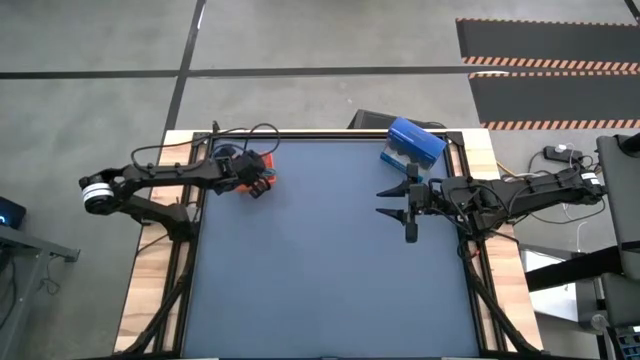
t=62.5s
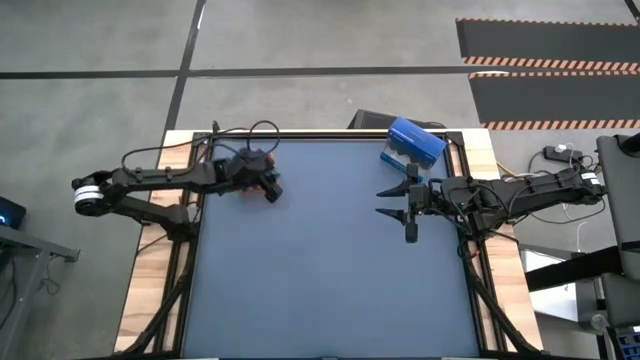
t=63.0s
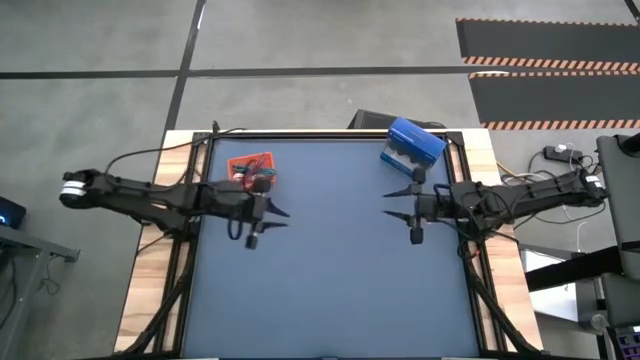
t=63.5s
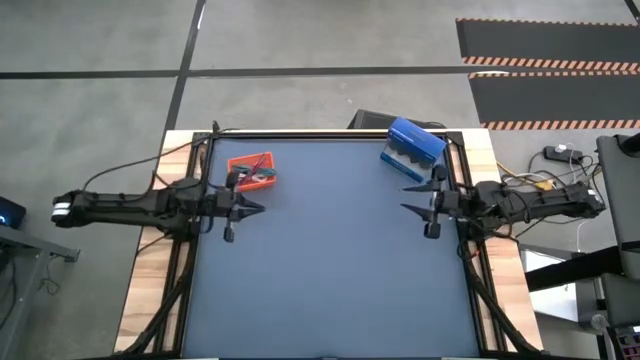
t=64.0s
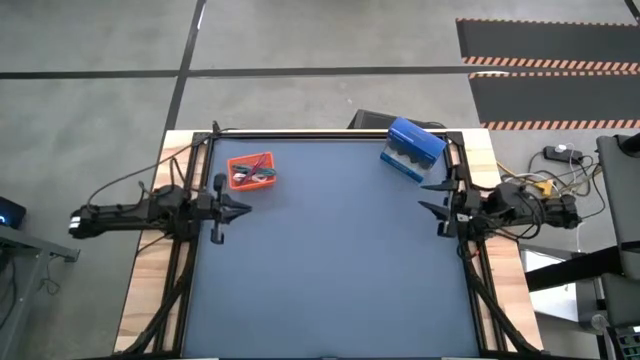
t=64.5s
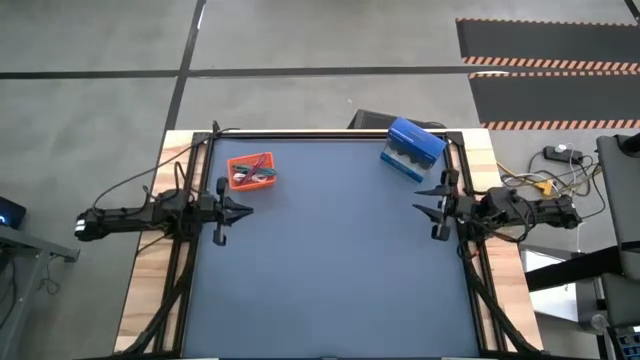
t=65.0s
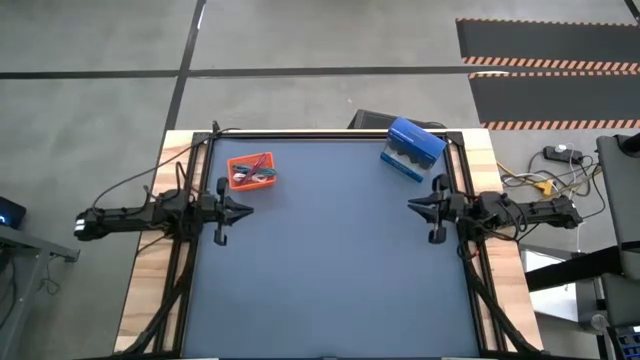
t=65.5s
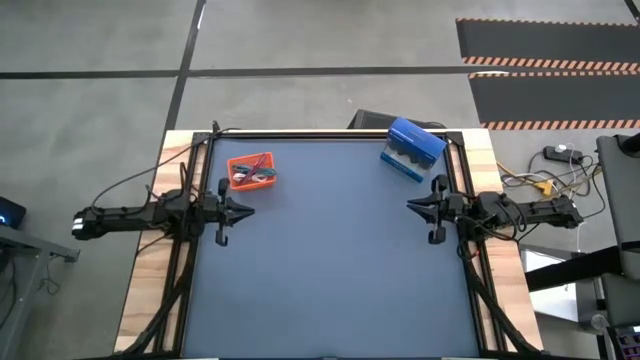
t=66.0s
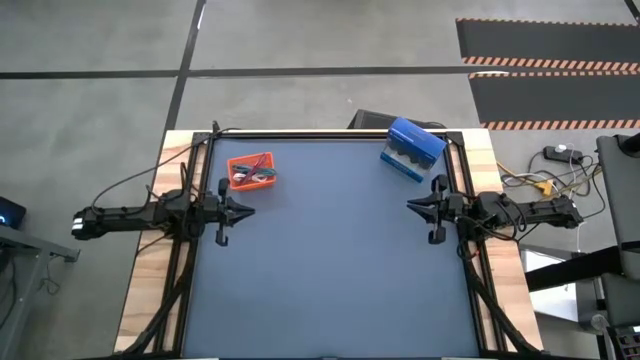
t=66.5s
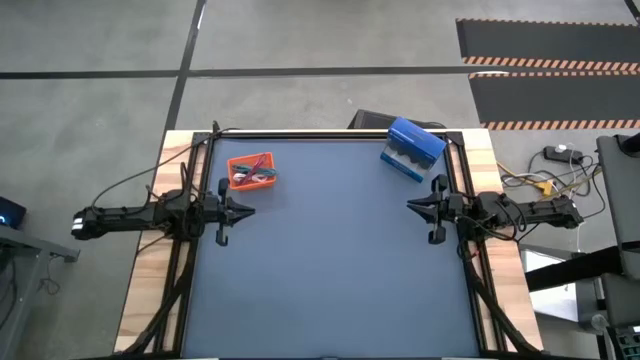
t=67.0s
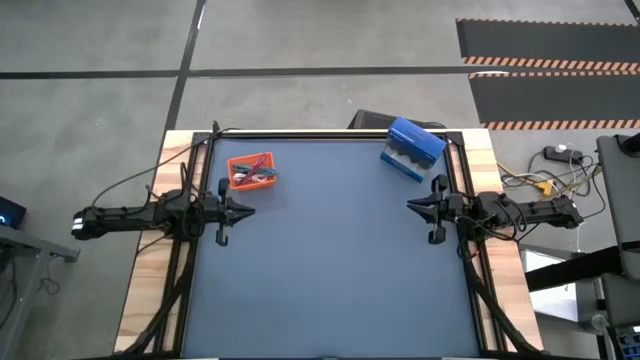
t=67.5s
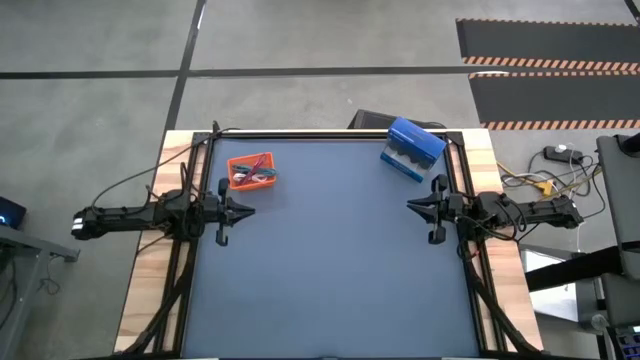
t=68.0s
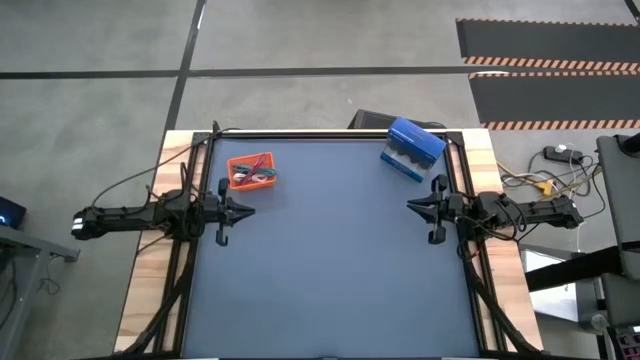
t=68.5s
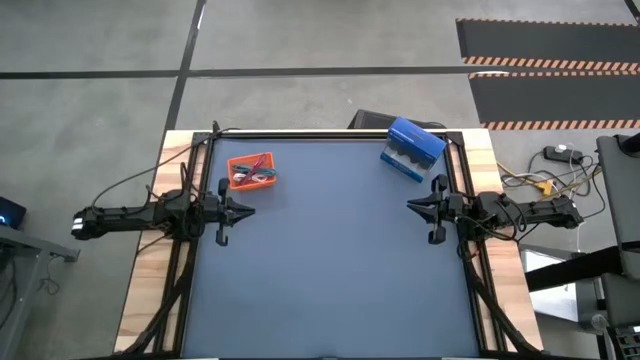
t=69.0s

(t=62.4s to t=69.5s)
Task: Pick and place USB-C Cables
Return to Home Position

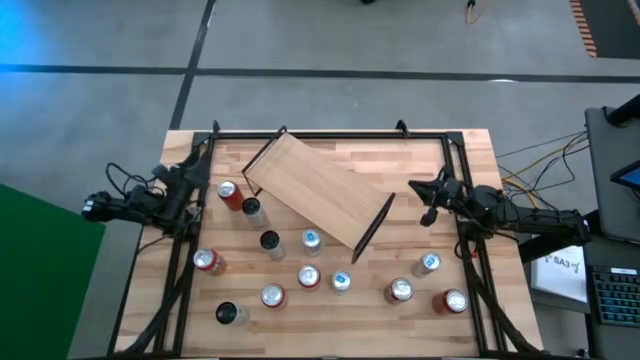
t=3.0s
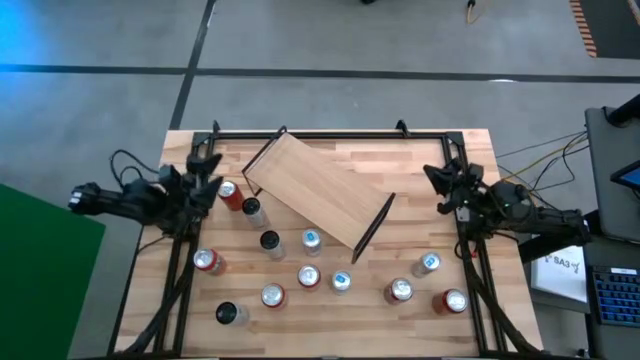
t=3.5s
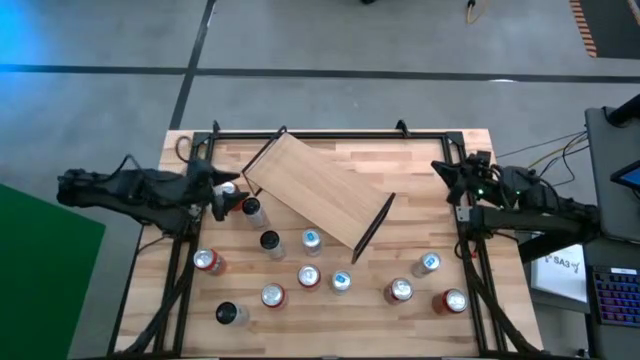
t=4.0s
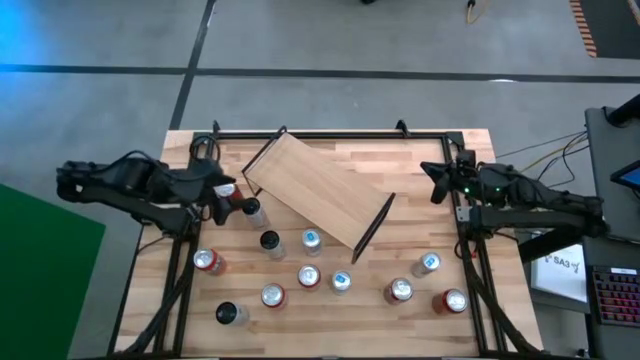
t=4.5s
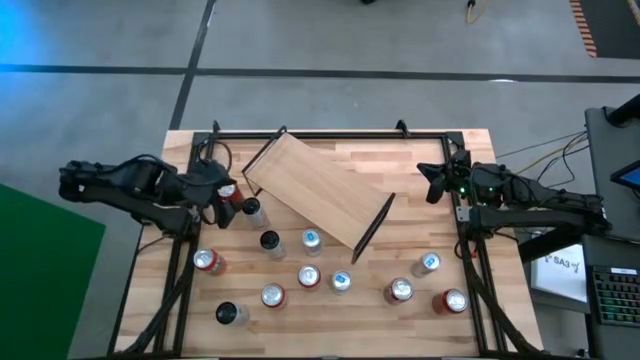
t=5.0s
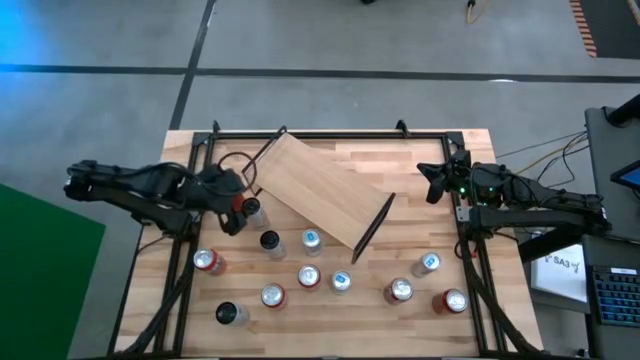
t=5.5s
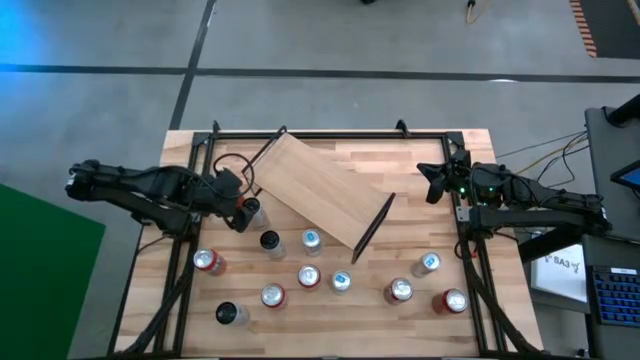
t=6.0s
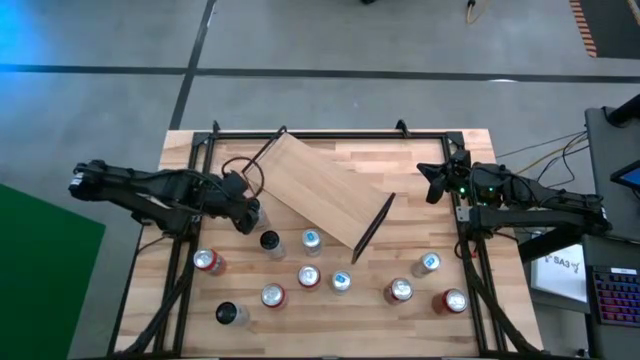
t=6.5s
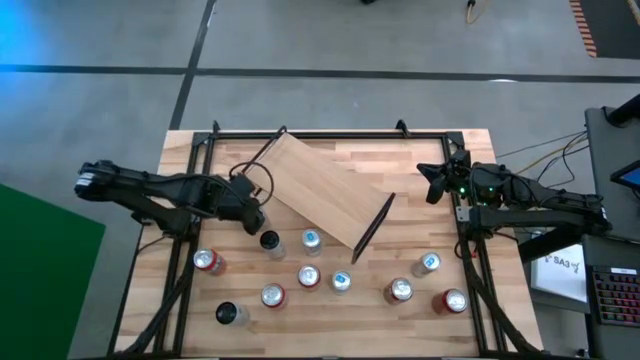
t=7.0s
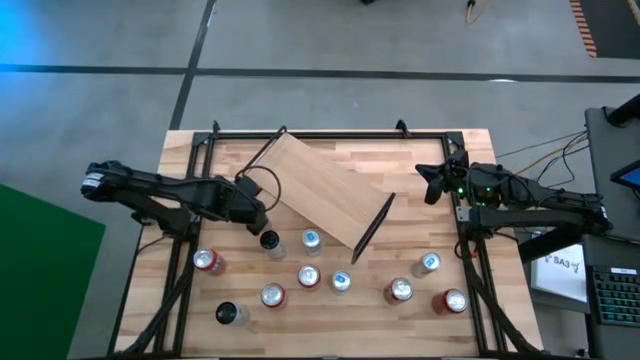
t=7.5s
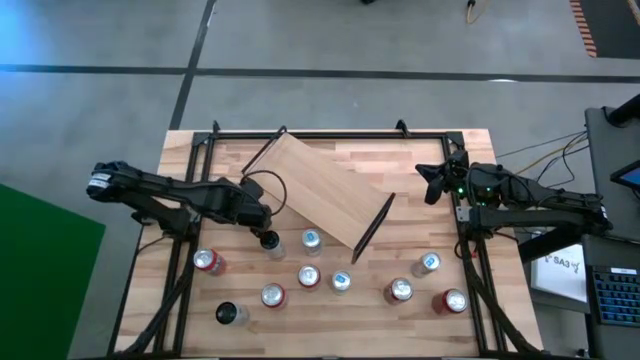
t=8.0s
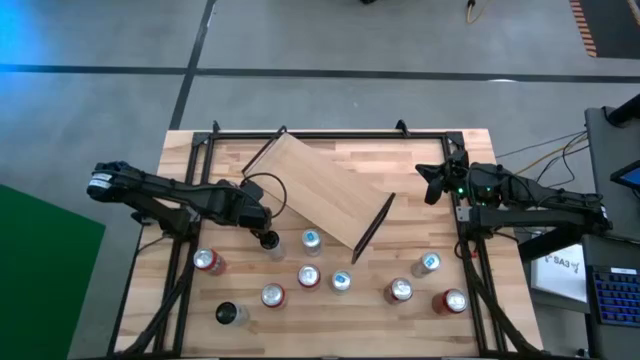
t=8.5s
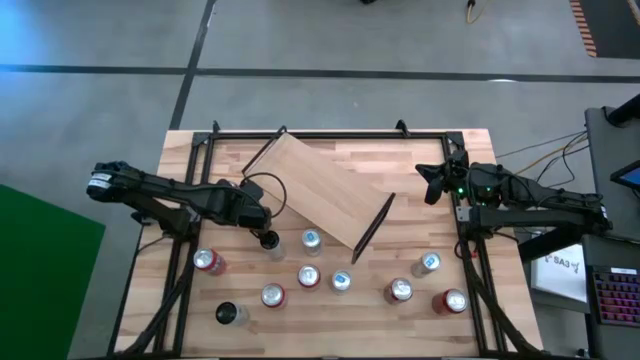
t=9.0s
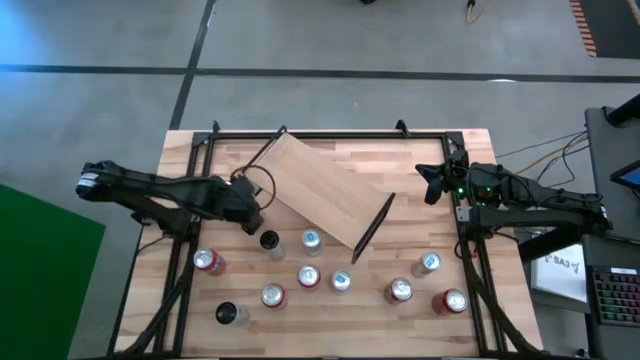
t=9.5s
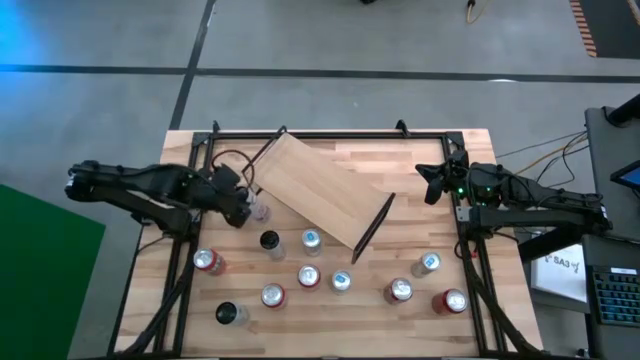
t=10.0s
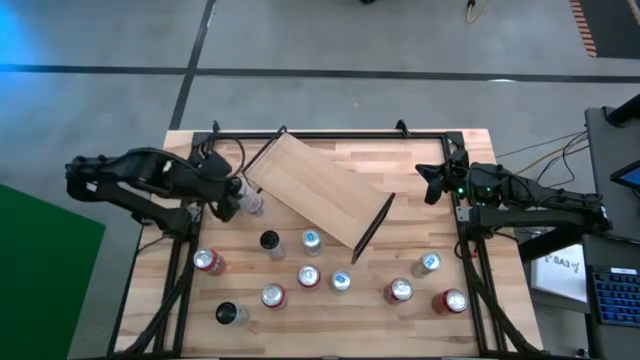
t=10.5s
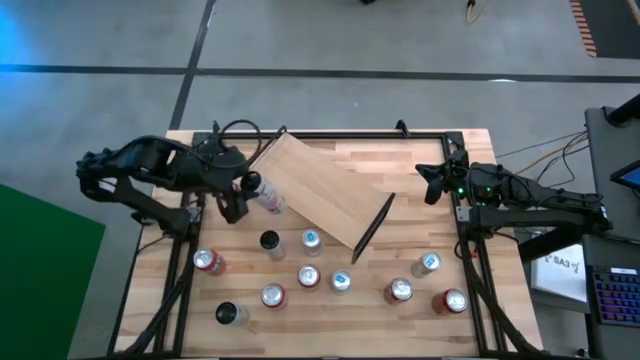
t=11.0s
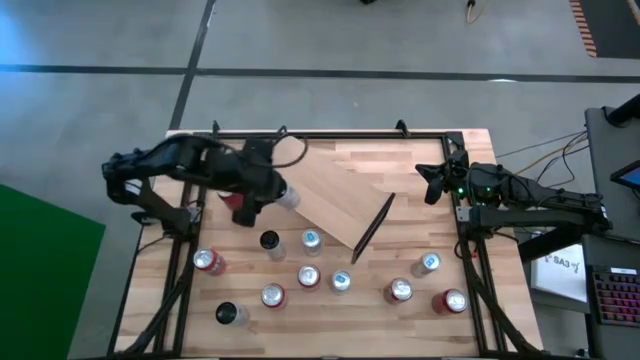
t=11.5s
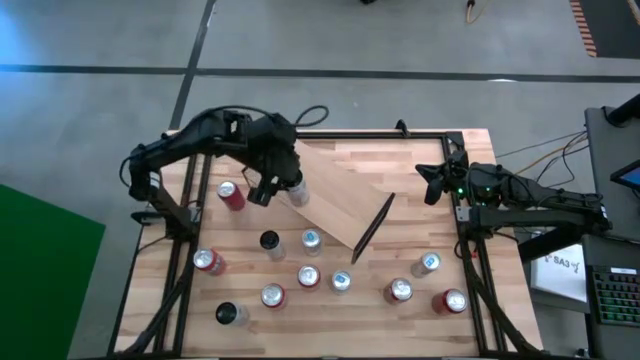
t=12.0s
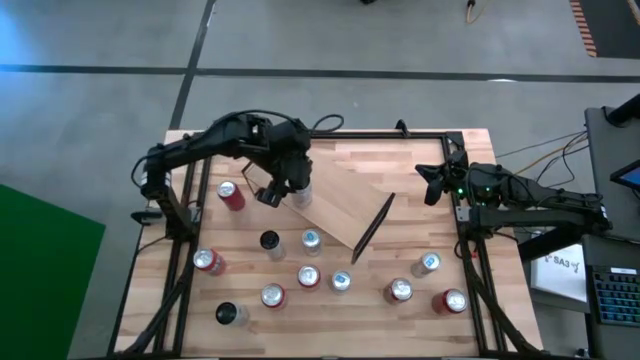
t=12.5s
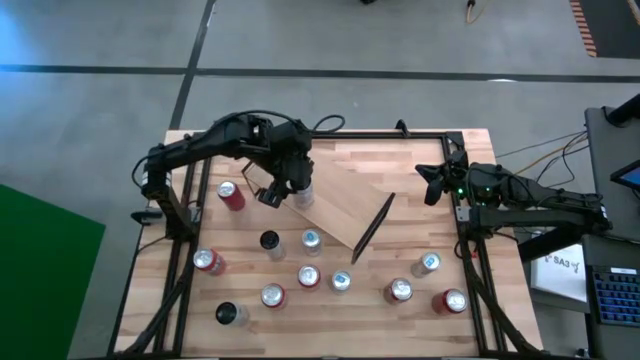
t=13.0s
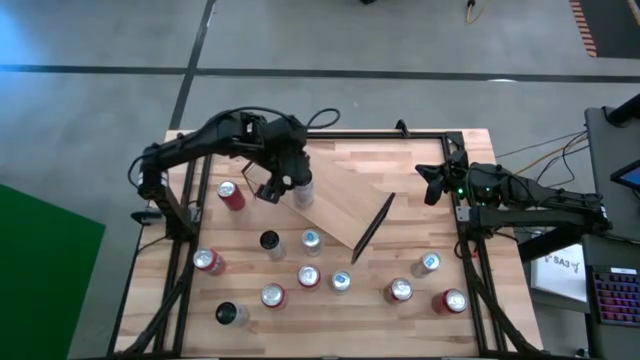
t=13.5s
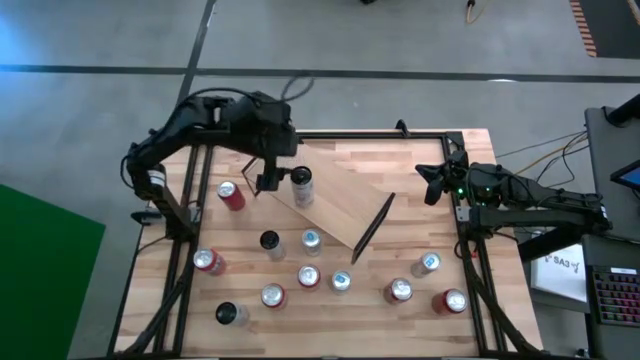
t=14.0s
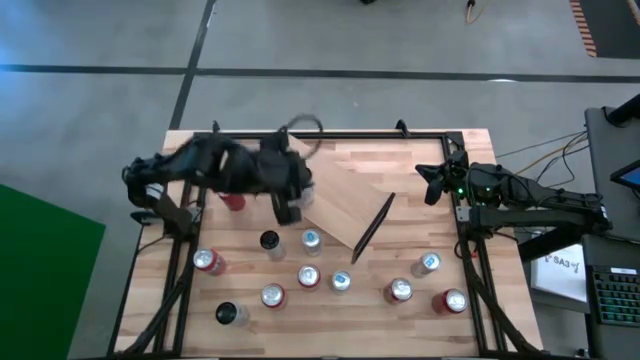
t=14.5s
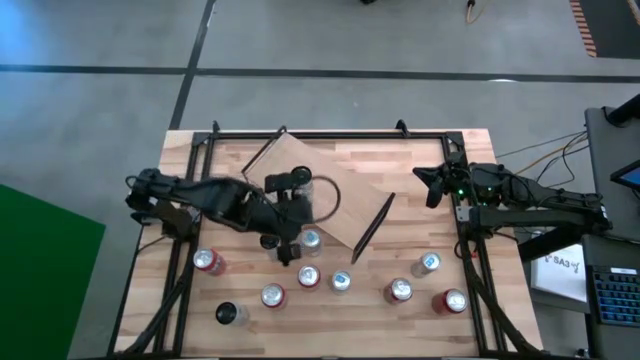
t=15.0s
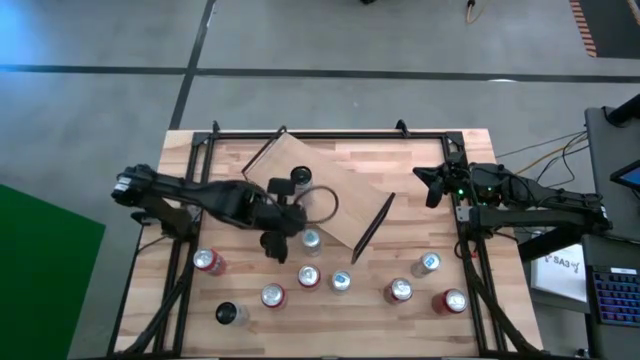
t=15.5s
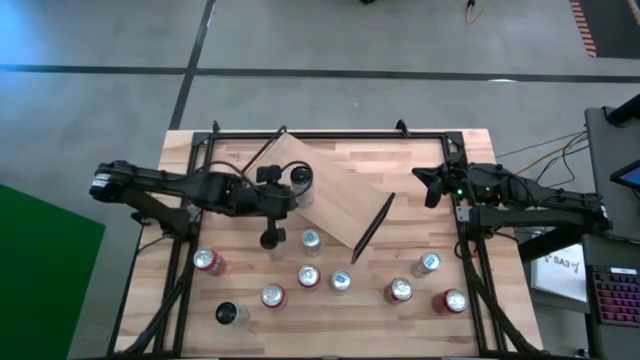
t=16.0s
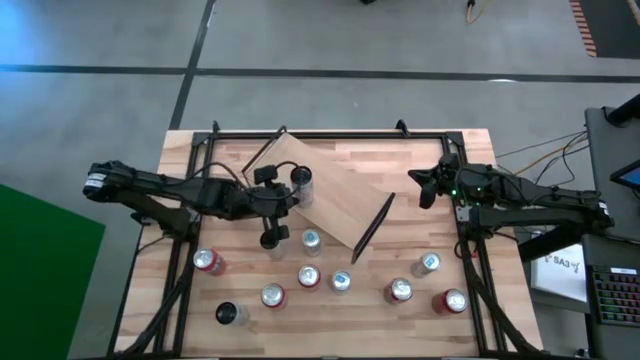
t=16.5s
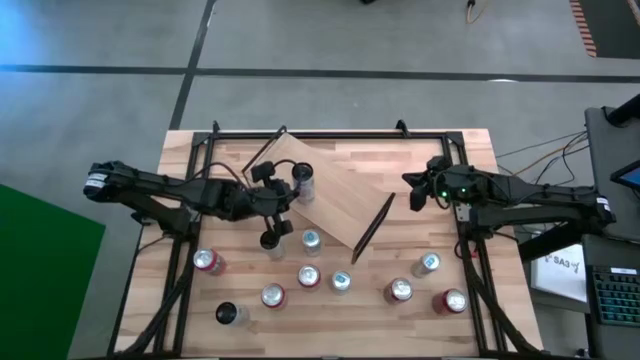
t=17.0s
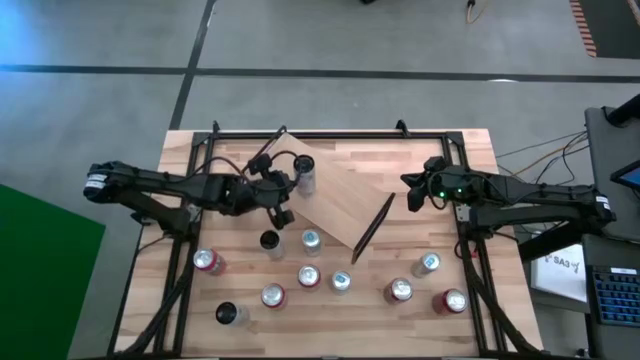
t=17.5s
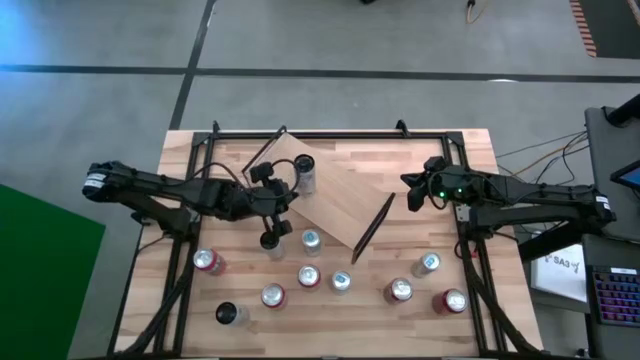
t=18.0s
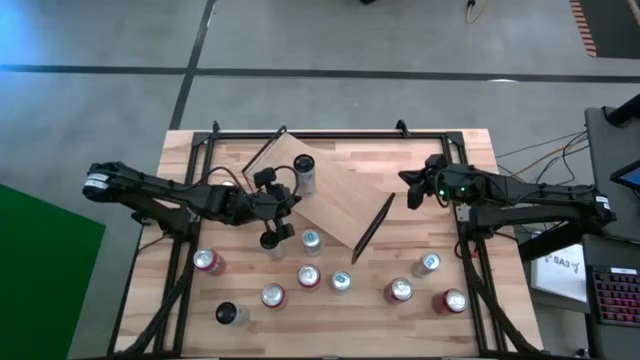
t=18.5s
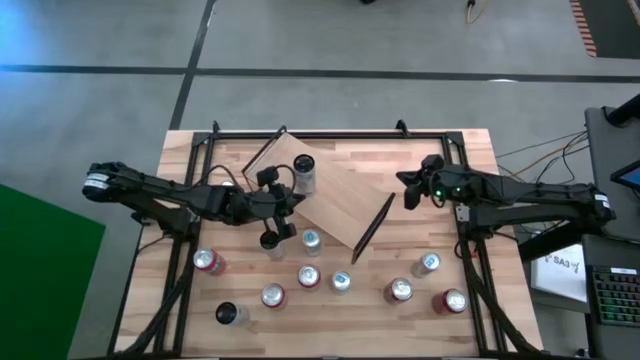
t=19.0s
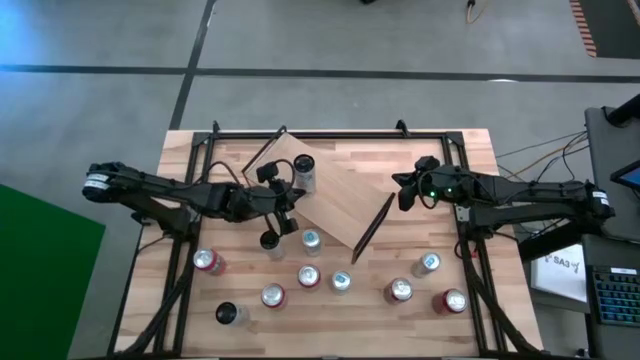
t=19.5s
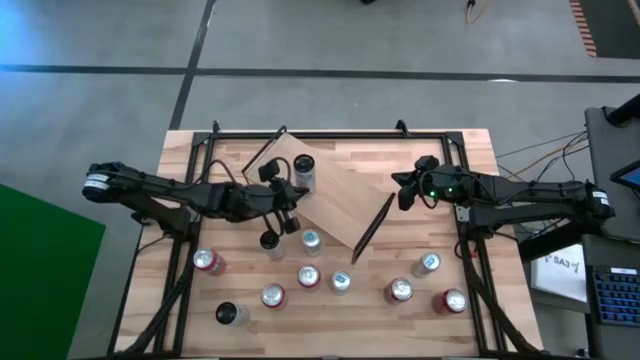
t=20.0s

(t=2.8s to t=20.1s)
Task: Place canned beverage on shelf
Put the white/pink soda can on the shelf
